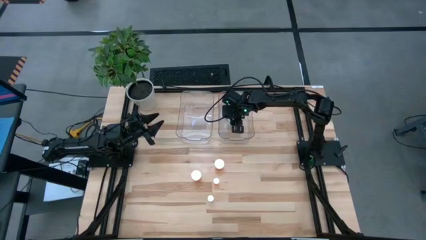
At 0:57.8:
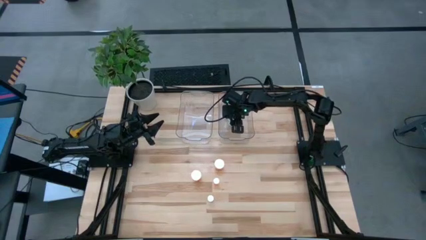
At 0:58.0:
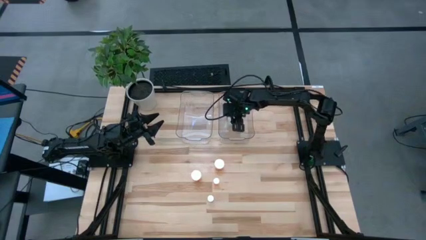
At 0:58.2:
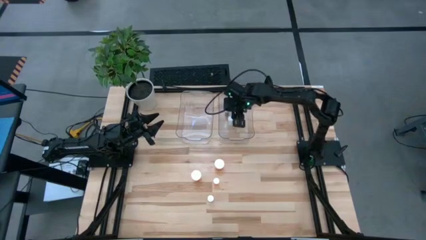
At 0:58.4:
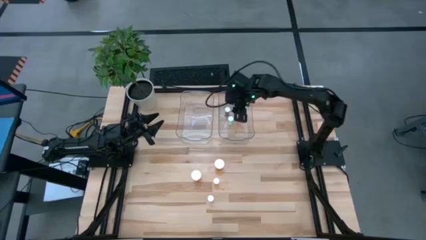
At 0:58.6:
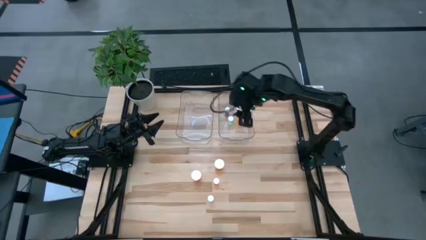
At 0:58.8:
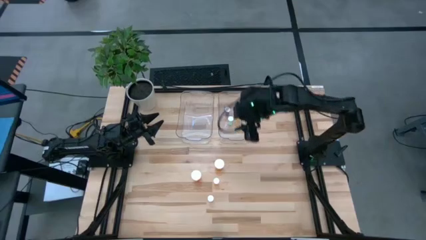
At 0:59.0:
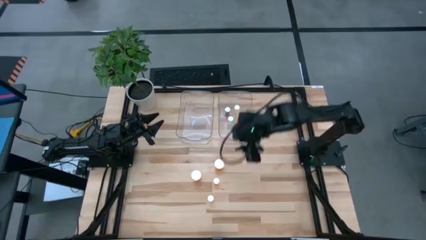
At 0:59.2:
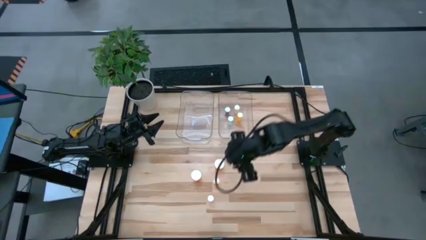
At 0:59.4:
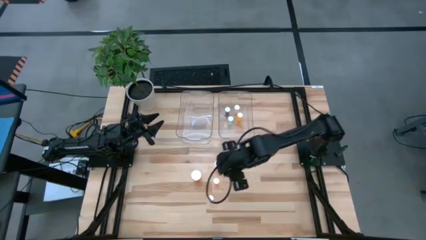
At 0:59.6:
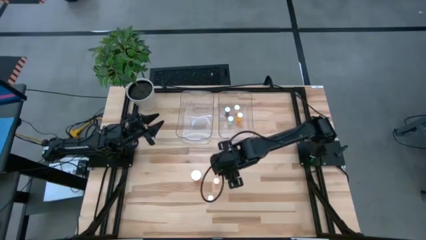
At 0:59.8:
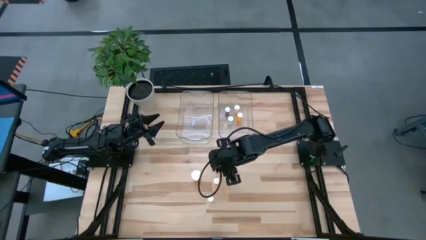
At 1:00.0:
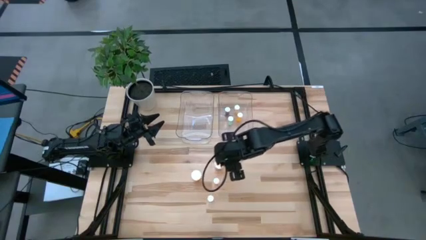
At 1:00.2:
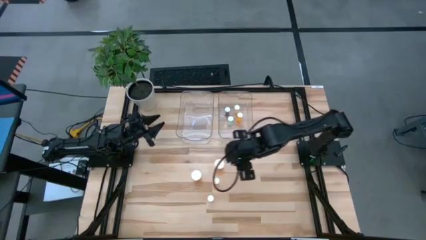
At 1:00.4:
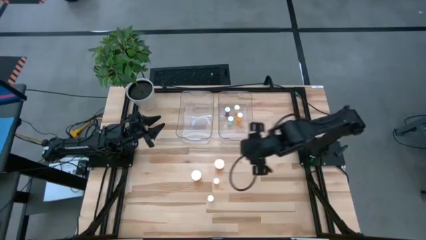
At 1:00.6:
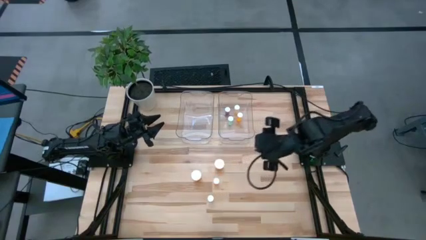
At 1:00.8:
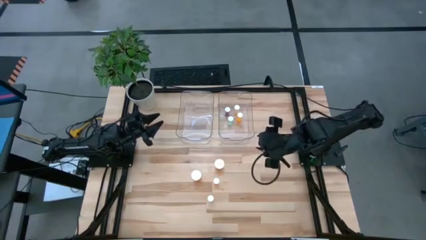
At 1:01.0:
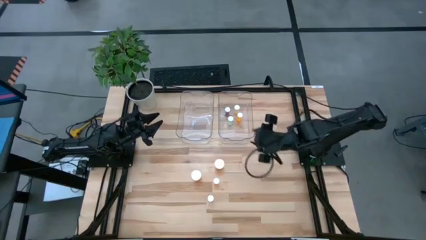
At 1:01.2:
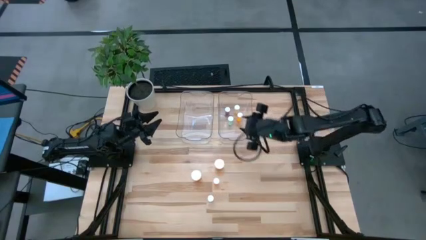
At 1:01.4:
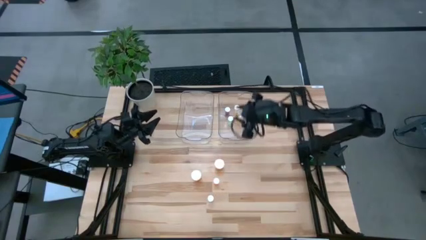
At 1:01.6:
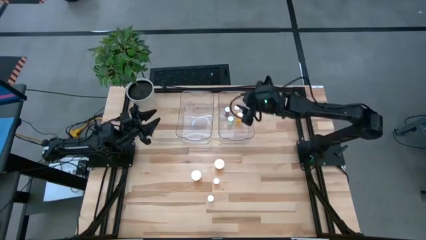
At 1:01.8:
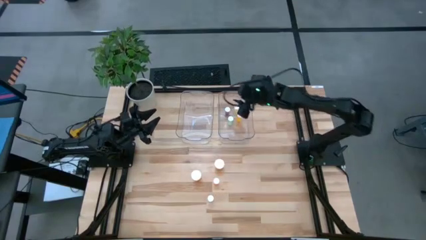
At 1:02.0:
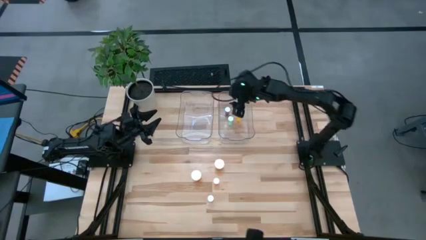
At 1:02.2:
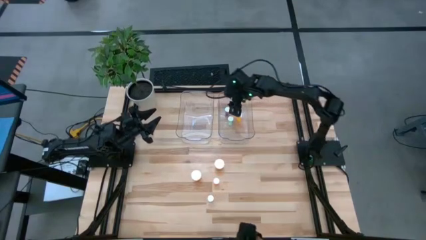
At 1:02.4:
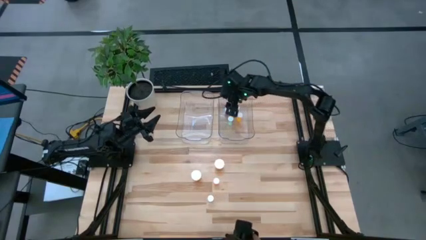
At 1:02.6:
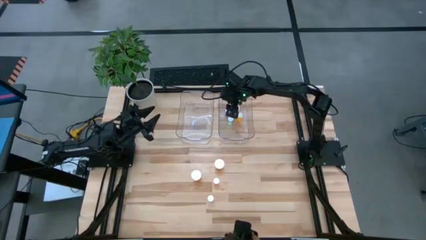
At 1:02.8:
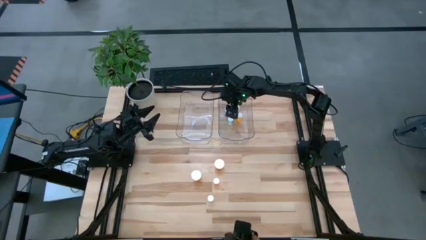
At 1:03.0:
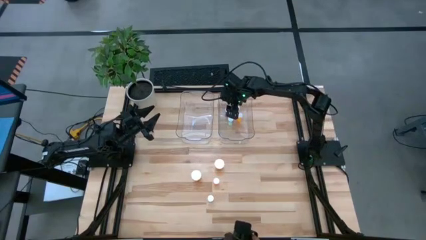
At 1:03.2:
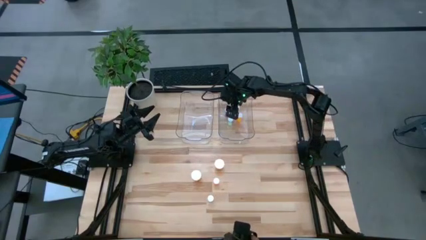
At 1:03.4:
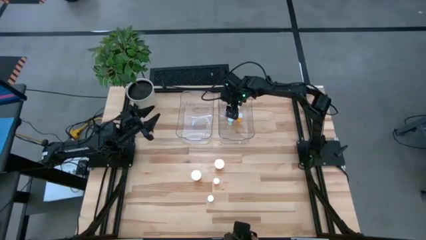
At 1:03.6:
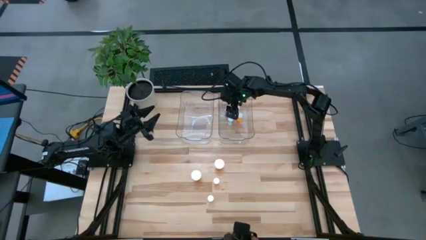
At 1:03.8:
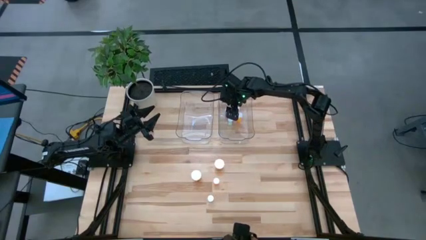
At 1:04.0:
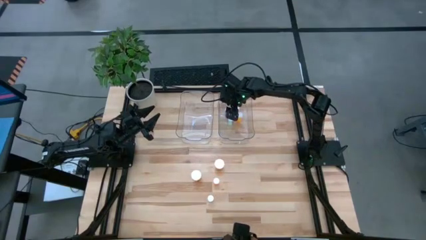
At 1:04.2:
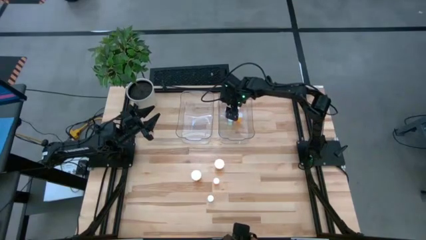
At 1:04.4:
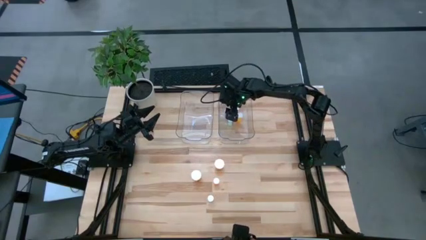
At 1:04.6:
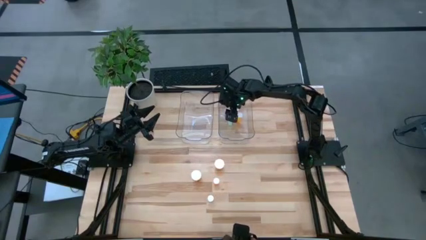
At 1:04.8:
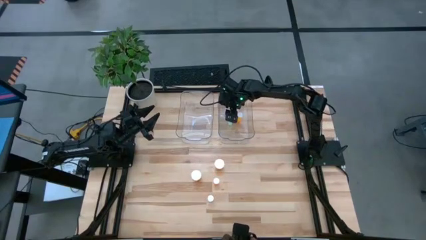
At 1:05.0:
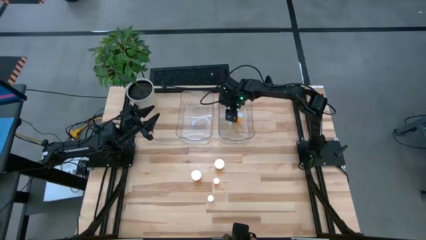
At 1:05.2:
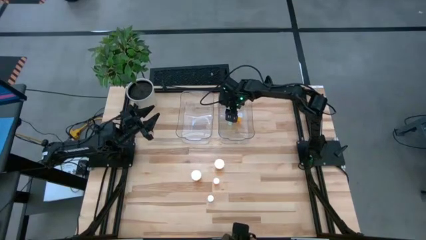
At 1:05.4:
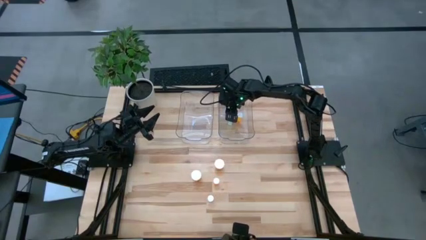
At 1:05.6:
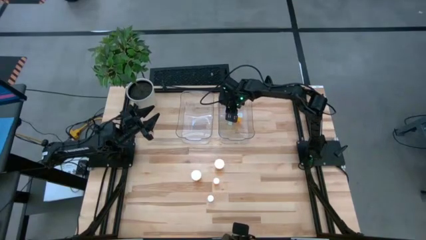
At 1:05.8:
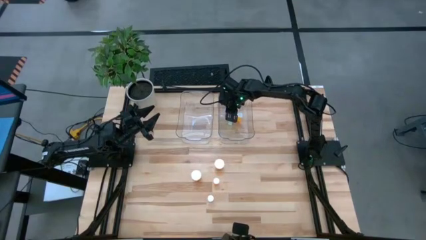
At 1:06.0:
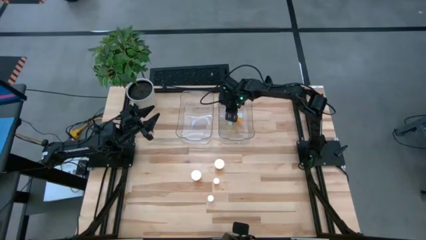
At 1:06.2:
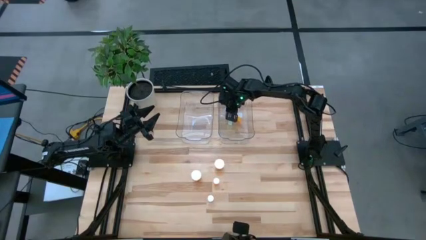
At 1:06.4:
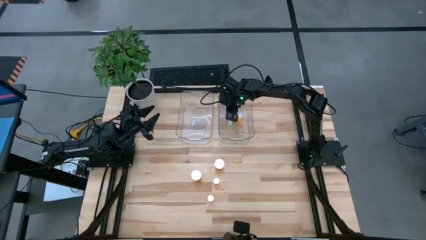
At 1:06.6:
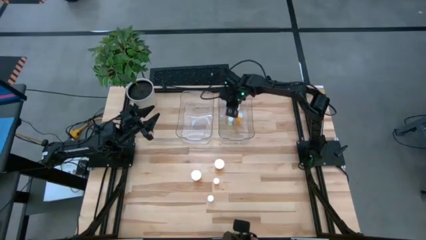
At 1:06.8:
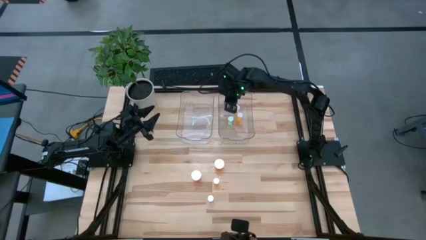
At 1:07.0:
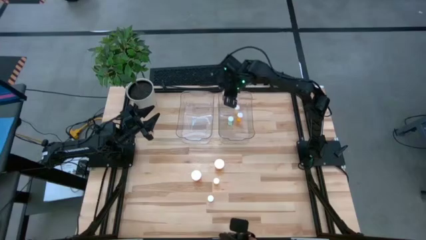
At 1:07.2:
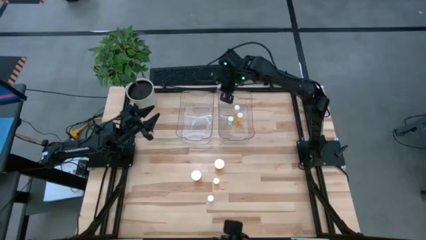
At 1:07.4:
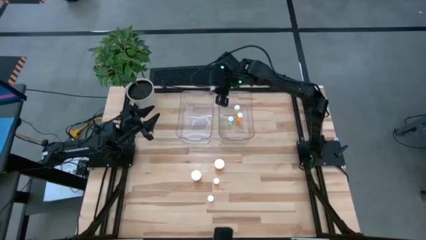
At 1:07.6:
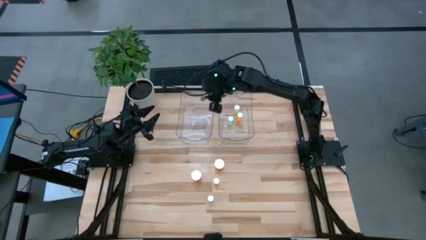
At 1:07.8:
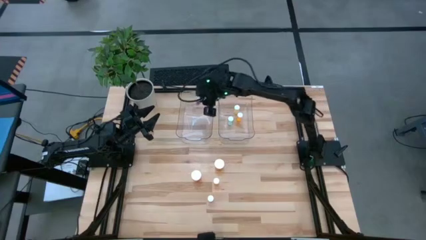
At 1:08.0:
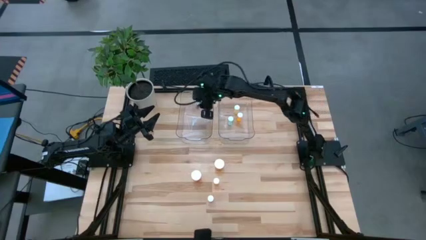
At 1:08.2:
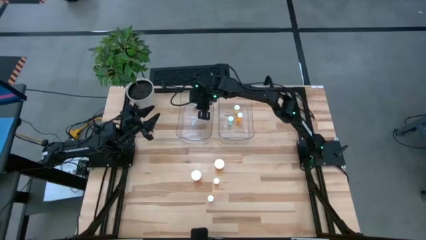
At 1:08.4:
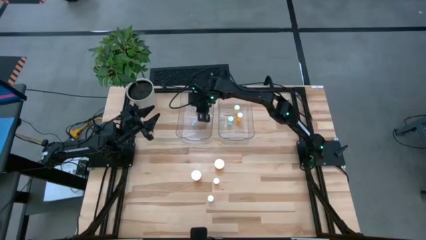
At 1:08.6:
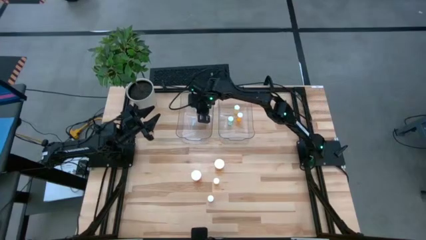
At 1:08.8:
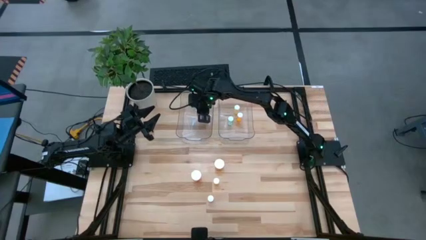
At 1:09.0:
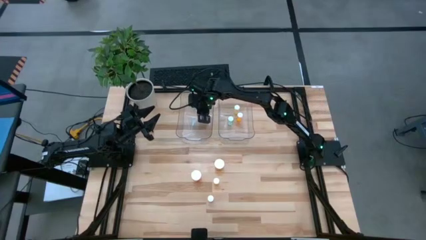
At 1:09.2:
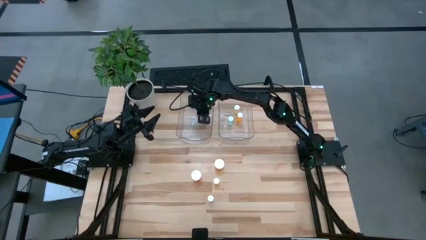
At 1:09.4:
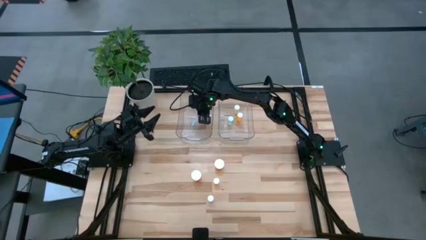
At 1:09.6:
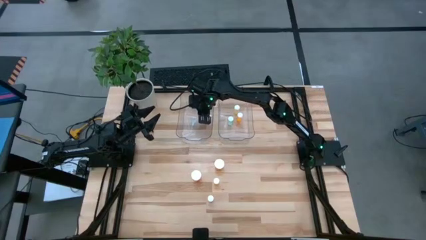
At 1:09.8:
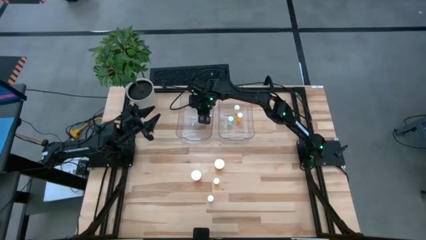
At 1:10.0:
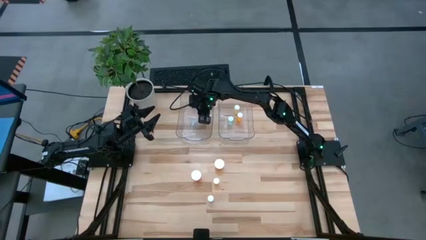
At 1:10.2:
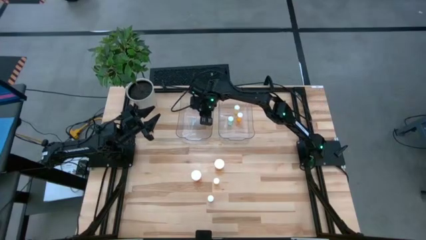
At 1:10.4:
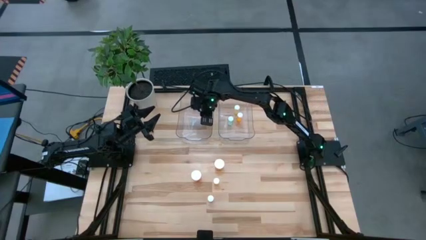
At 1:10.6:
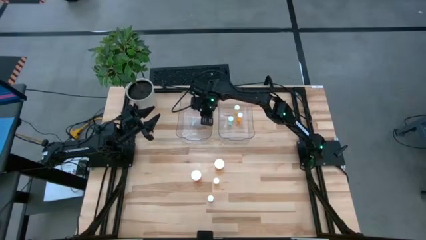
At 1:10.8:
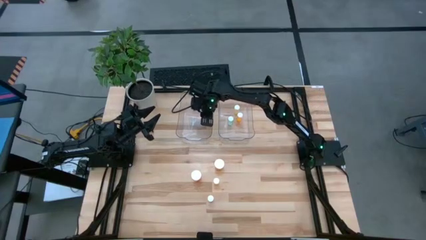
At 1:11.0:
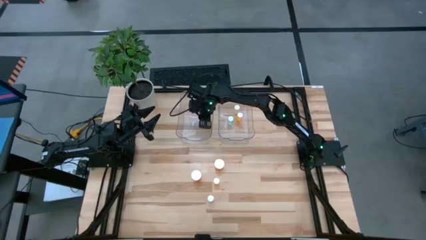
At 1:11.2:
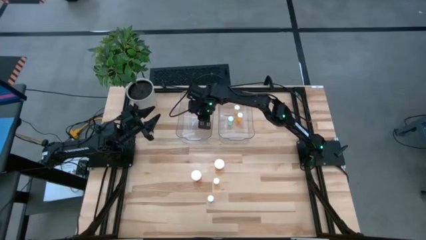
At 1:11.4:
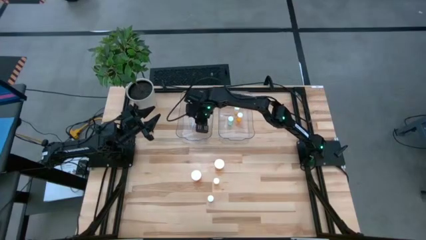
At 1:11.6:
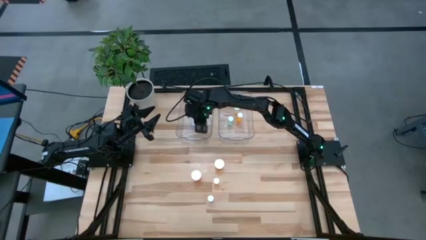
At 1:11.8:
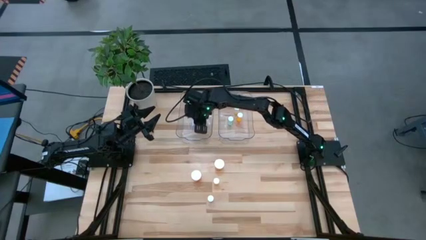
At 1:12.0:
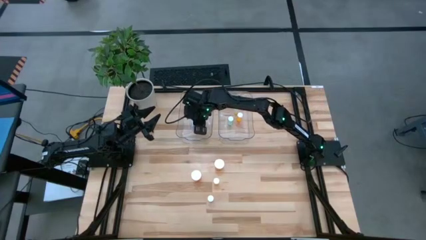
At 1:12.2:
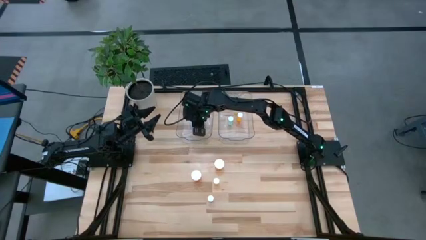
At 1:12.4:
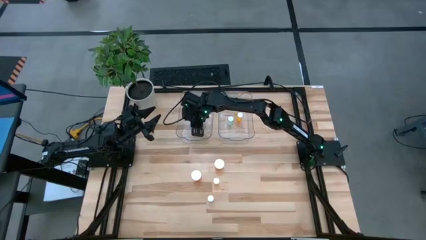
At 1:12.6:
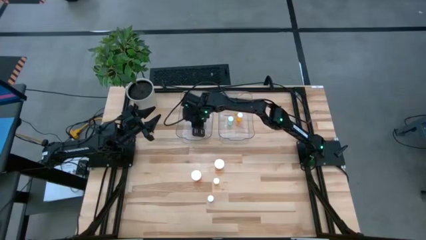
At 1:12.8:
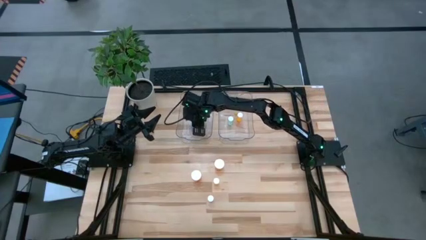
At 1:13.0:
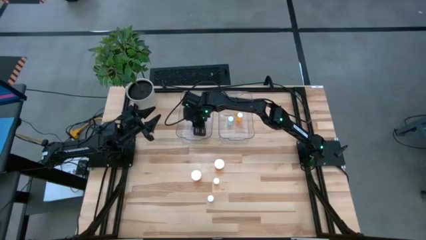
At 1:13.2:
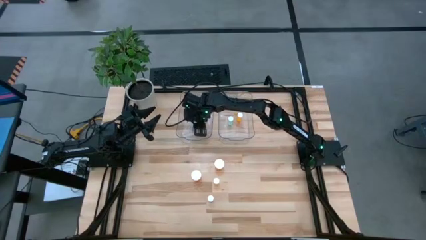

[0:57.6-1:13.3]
Task: Pick and place medicine bottles into bin by pill shape (circle, oval)
Put the blue capsule bottle into the left transparent bin
